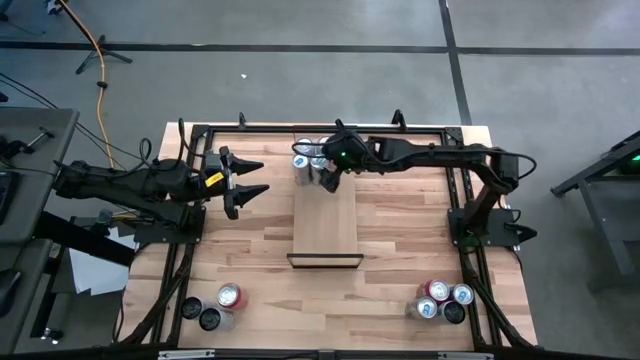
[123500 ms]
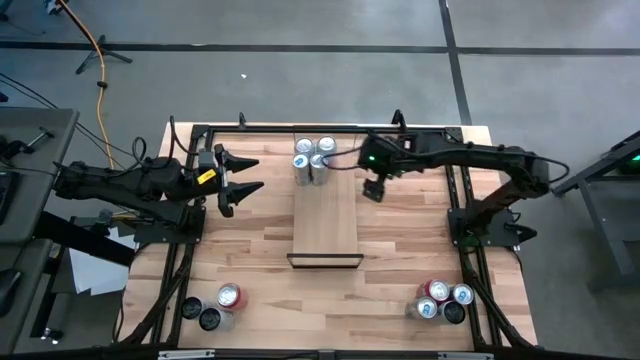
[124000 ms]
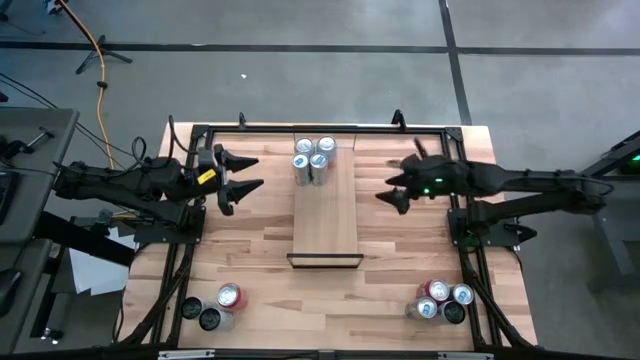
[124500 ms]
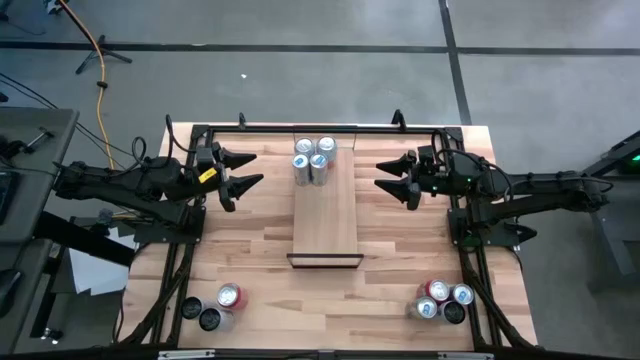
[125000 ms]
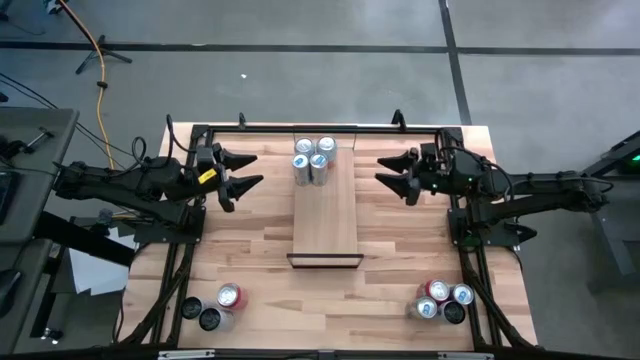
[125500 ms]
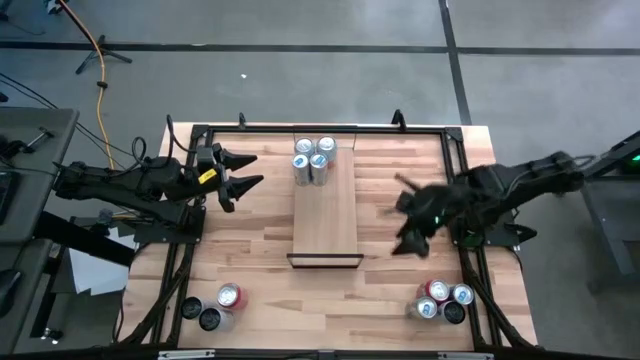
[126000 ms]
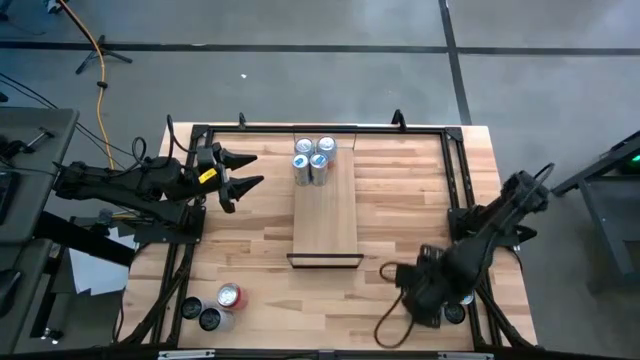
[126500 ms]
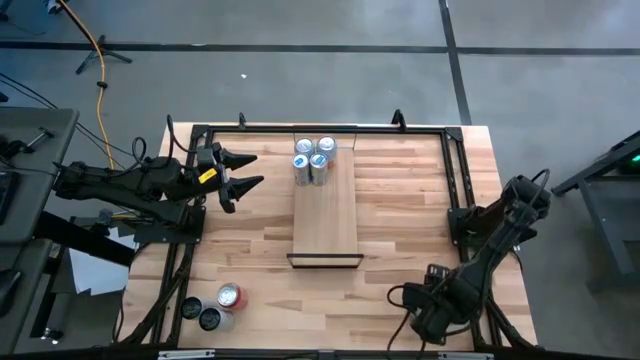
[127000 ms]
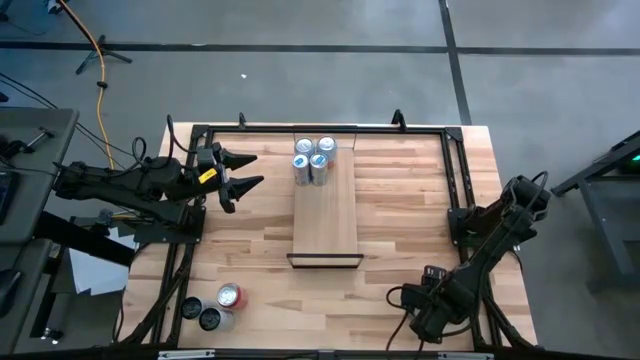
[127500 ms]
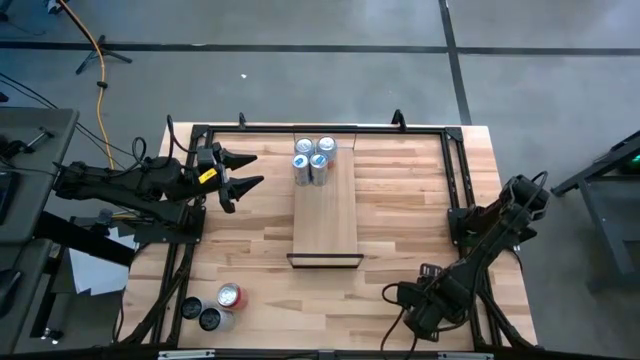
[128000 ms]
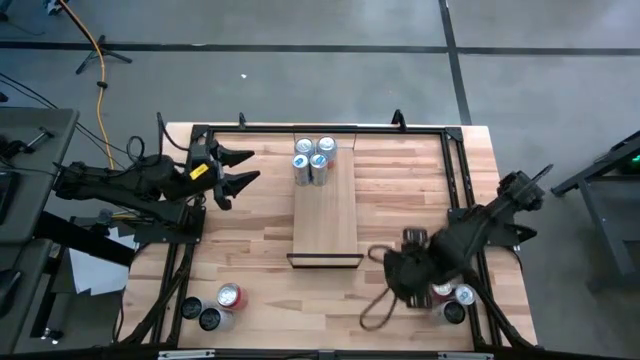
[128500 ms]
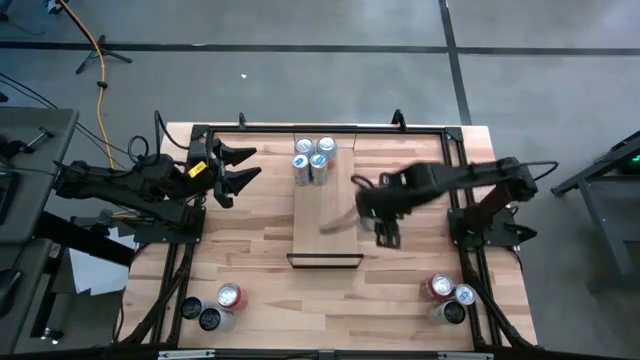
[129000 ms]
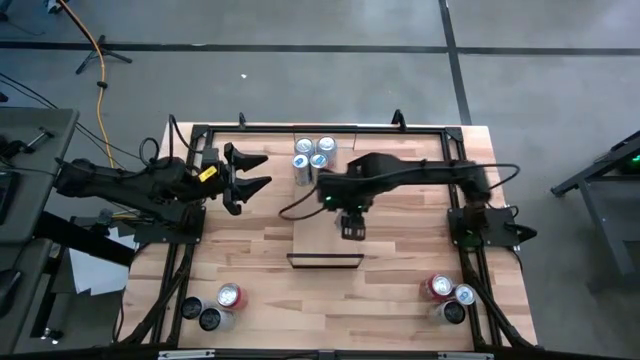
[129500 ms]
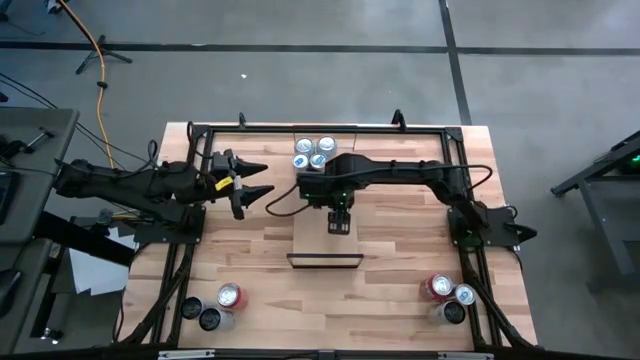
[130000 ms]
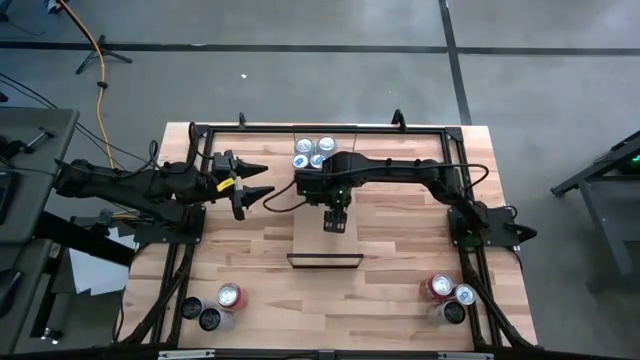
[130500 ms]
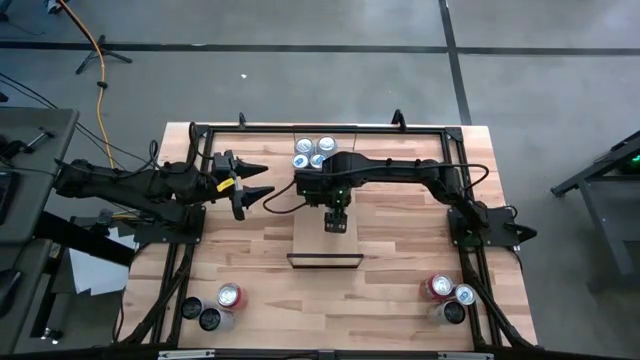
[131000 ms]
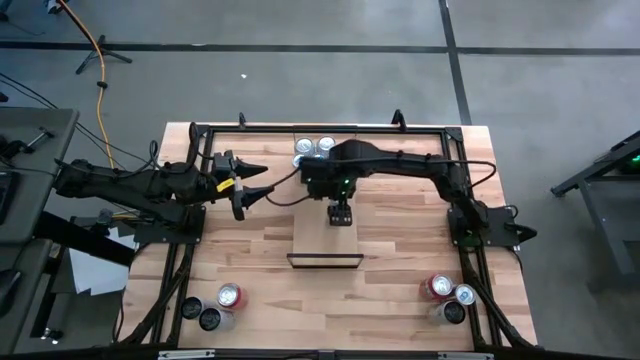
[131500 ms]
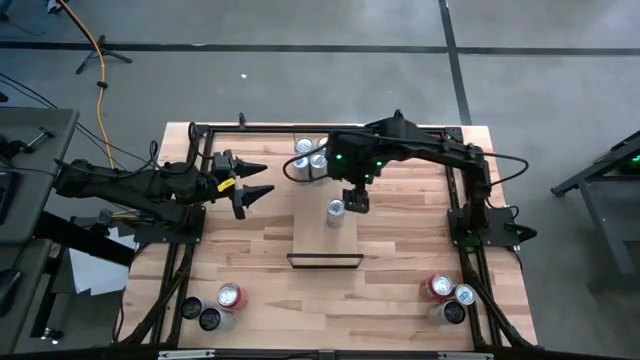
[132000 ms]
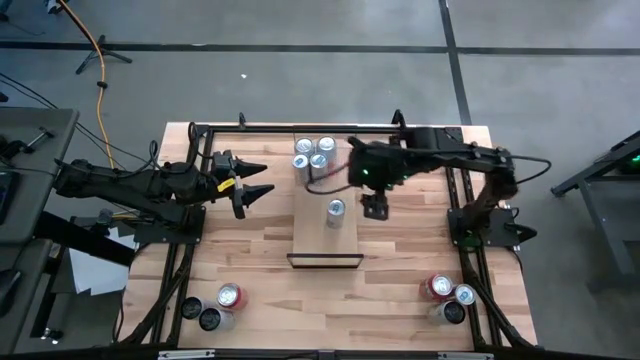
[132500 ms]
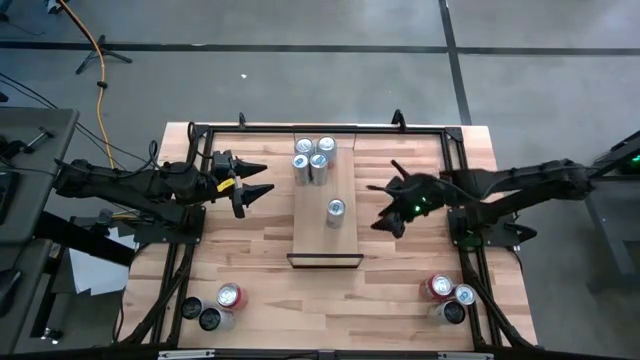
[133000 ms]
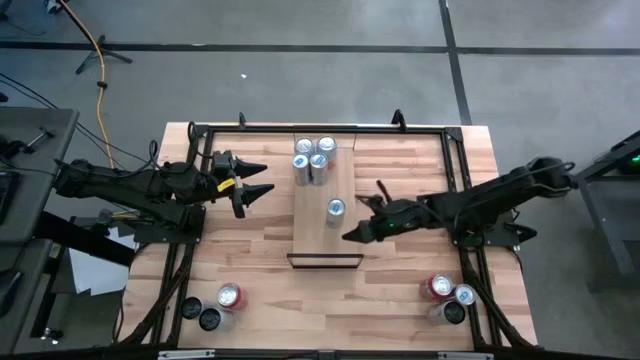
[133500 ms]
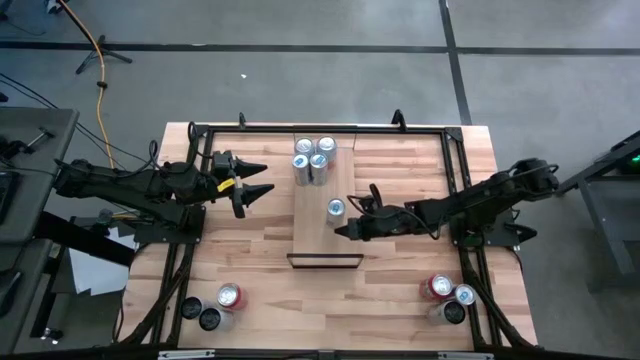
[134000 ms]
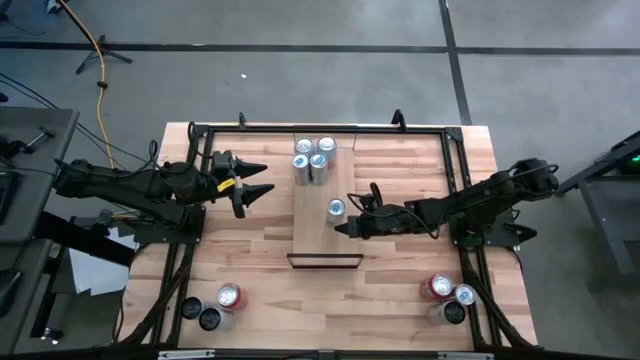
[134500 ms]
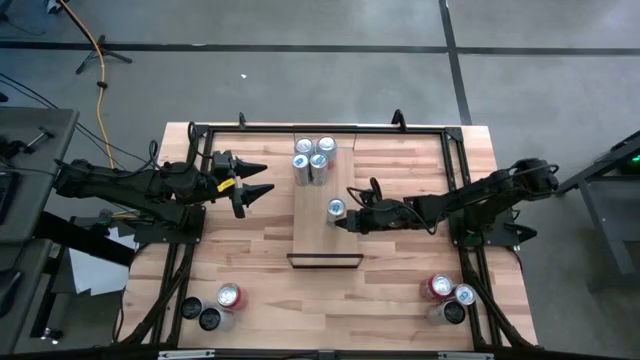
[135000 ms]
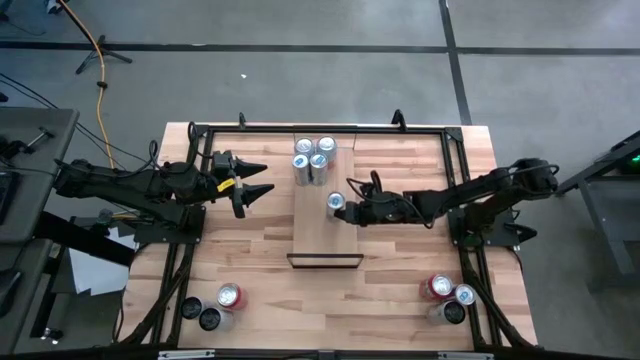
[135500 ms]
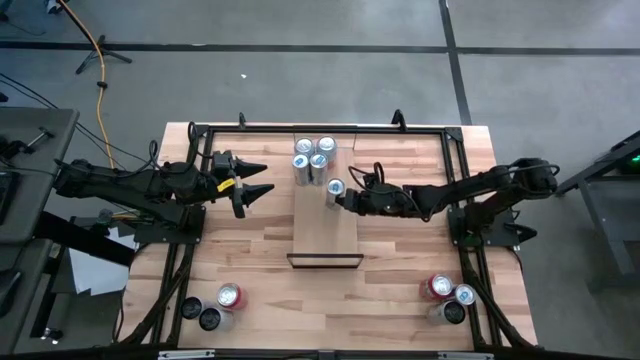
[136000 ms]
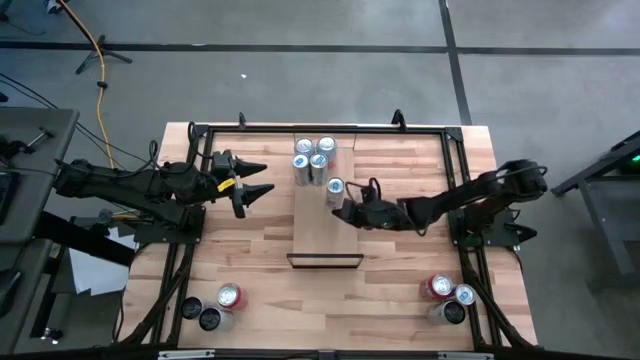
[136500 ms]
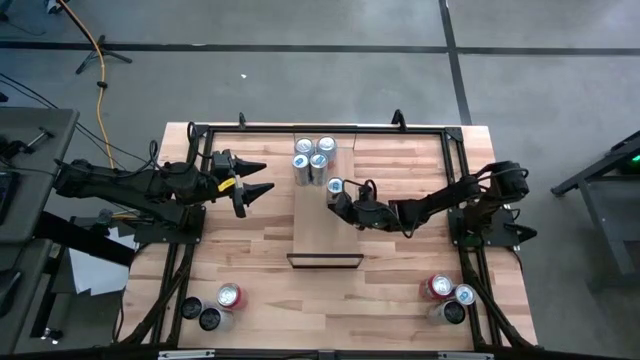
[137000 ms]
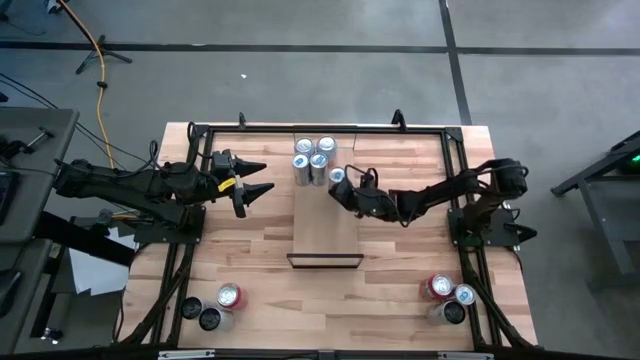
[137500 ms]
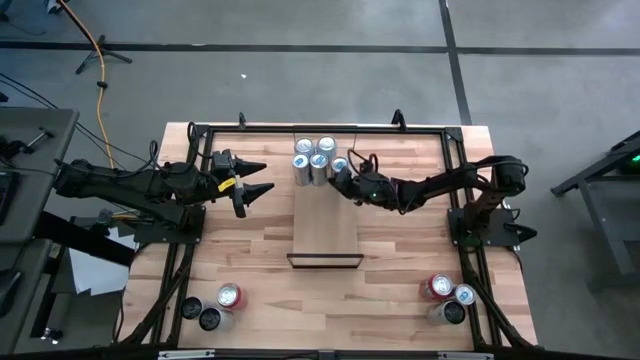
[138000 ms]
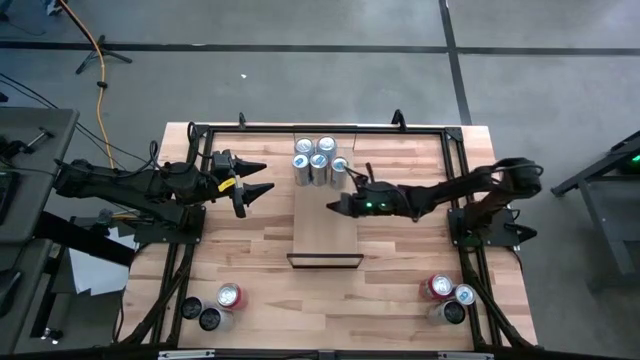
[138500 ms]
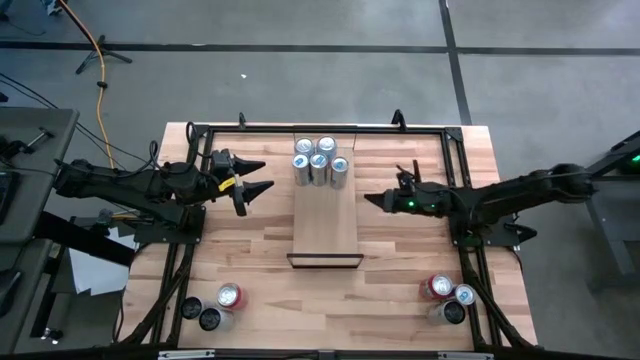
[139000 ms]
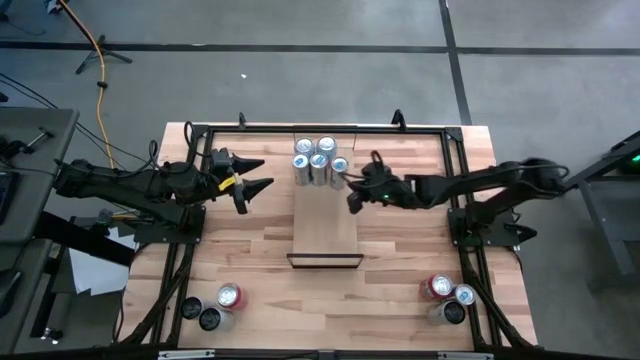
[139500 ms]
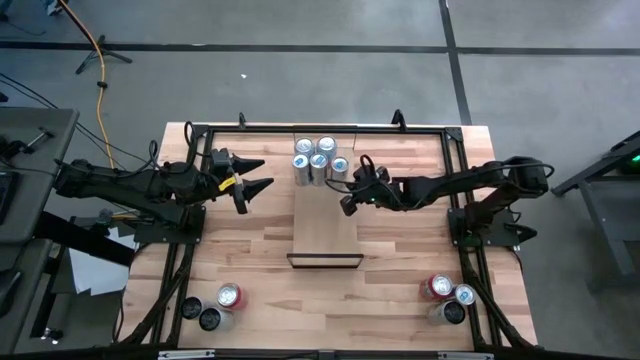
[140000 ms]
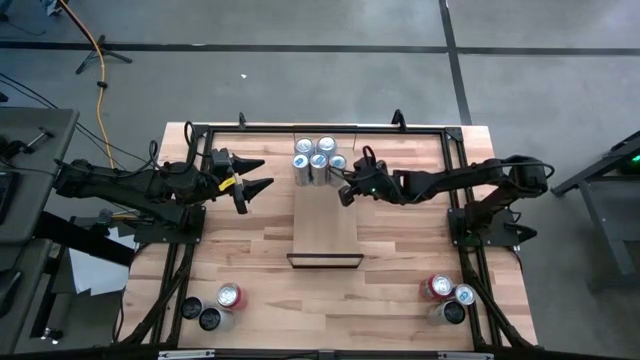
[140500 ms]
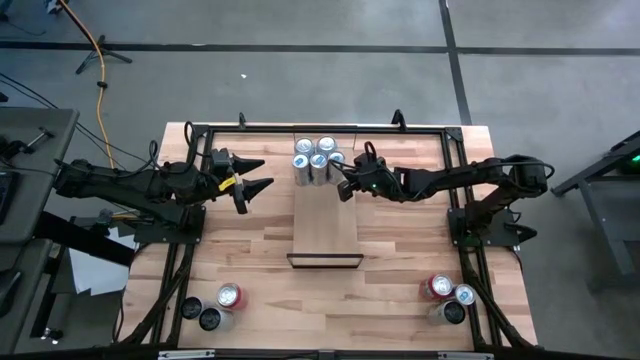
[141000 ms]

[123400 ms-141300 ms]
Task: Place canned beverage on shelf
Put the blue soda can on the shelf aligned with the other blue soda can

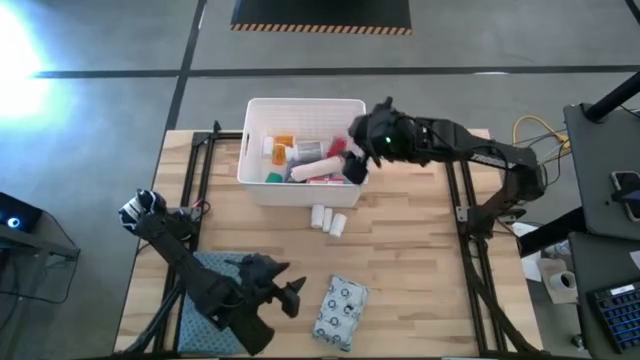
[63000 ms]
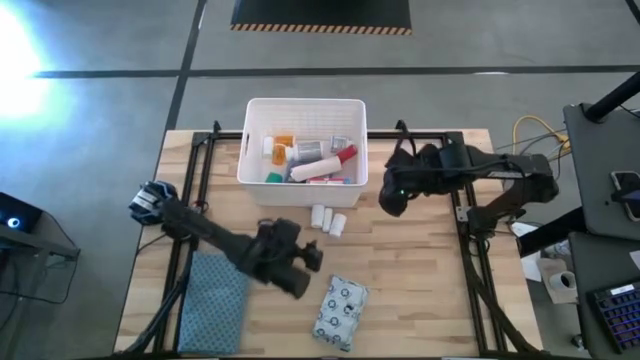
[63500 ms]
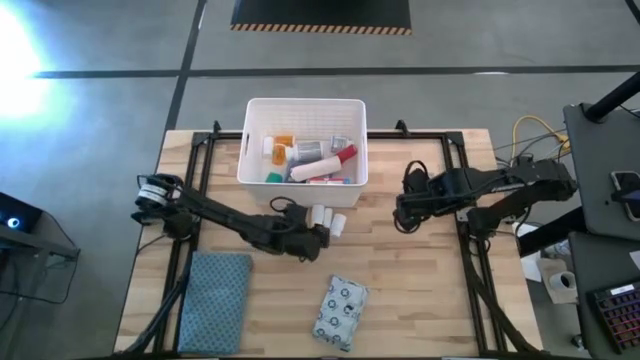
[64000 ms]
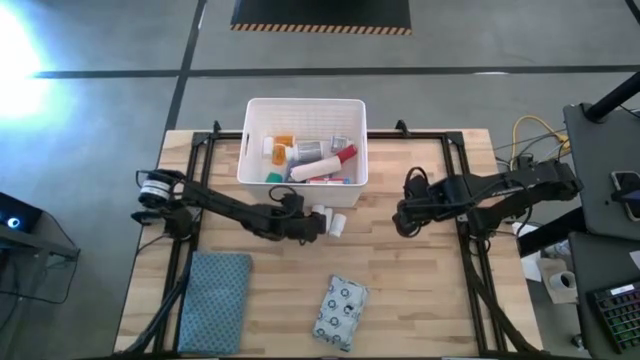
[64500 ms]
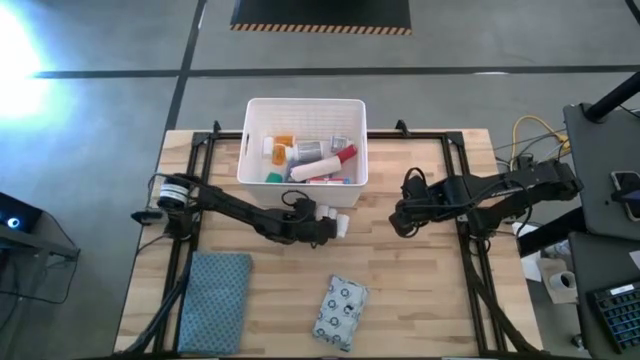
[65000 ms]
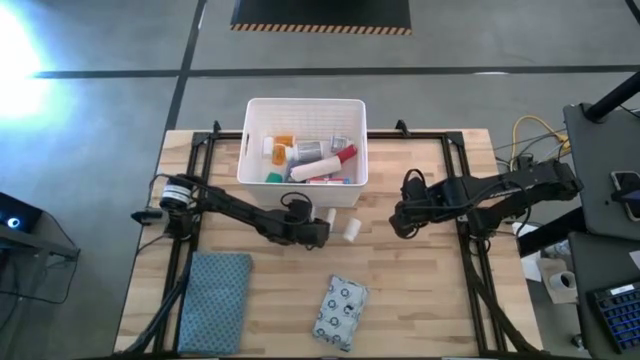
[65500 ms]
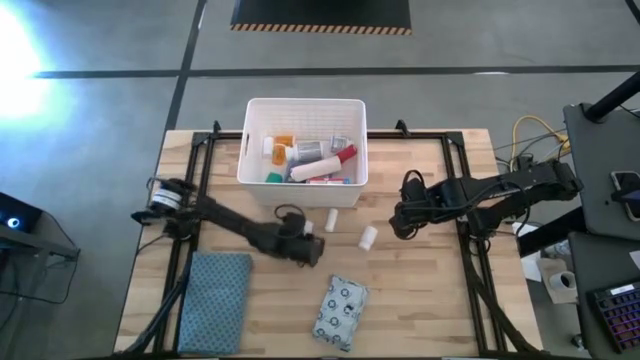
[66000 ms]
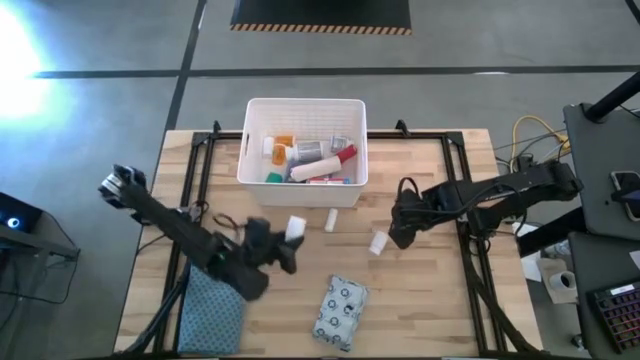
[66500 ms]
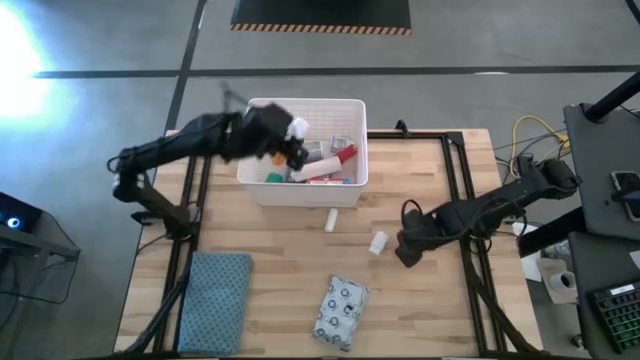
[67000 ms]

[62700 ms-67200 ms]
Task: Pick & place medical supplies in basket/bin
Put the left white pill bottle into the white bin
